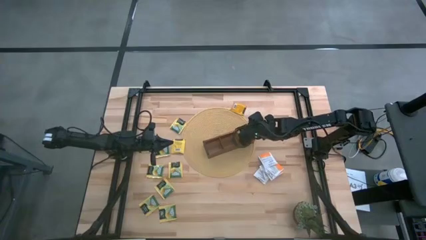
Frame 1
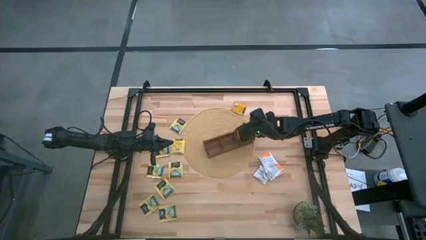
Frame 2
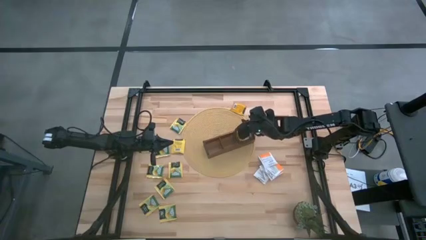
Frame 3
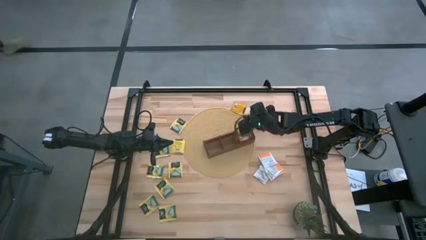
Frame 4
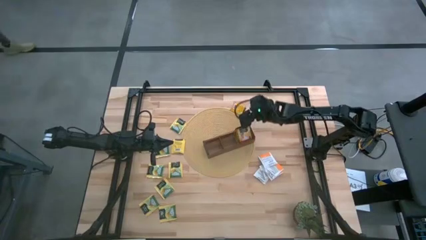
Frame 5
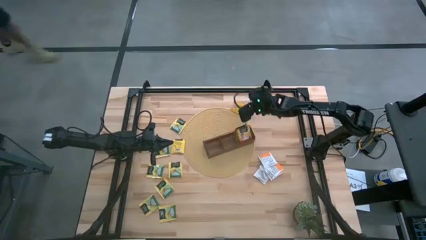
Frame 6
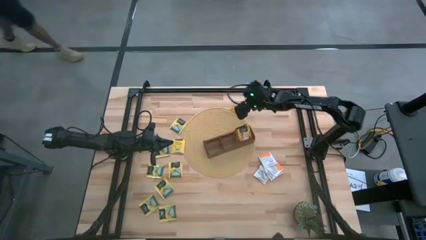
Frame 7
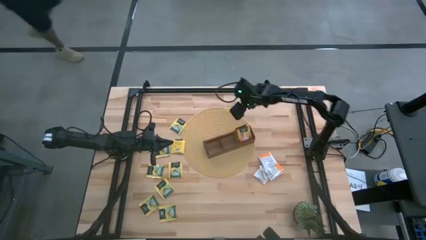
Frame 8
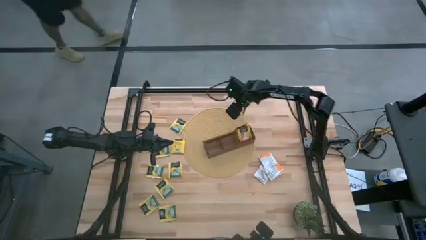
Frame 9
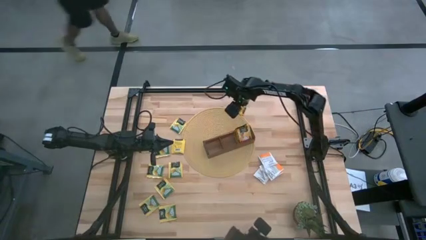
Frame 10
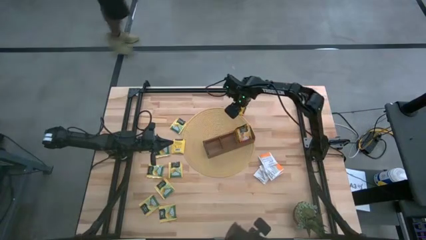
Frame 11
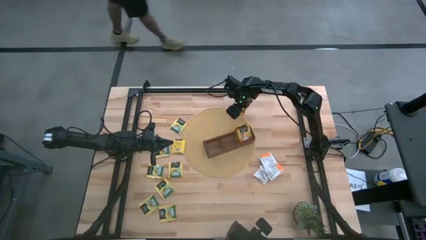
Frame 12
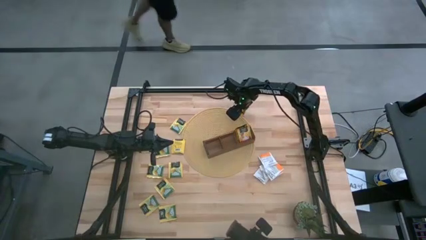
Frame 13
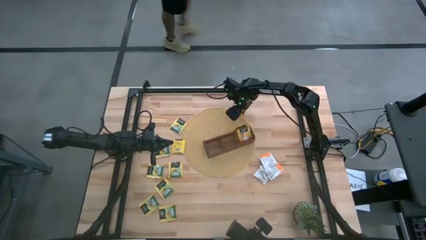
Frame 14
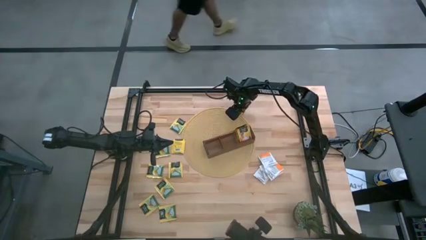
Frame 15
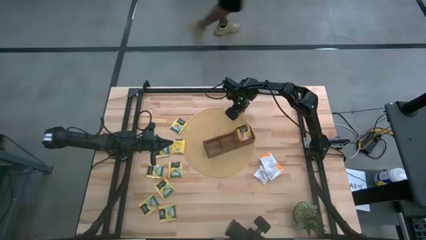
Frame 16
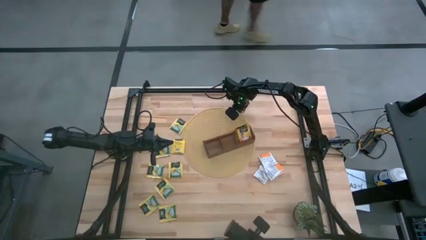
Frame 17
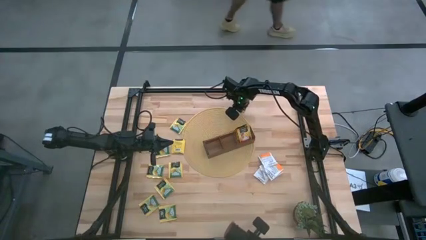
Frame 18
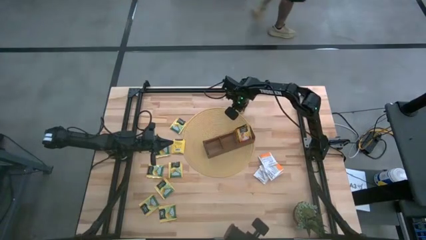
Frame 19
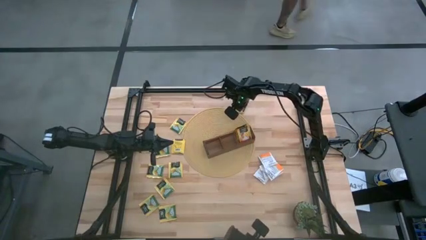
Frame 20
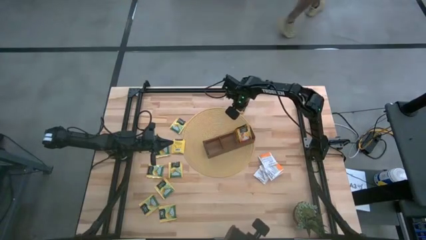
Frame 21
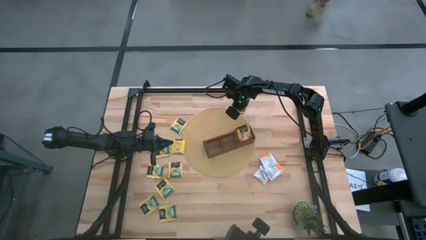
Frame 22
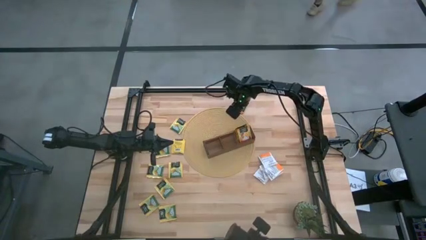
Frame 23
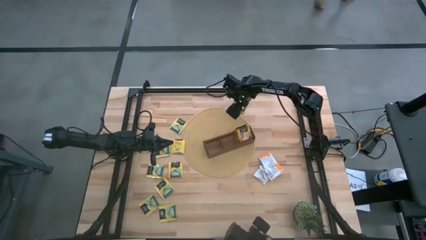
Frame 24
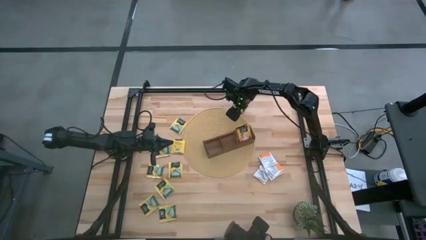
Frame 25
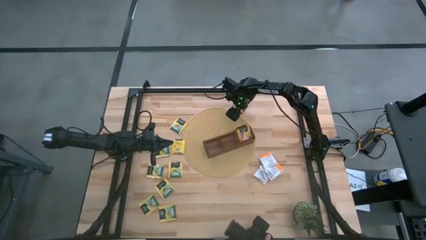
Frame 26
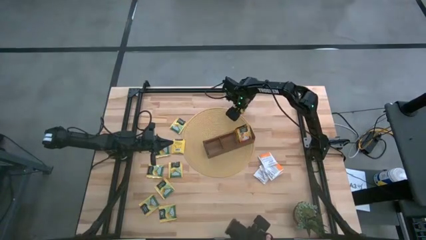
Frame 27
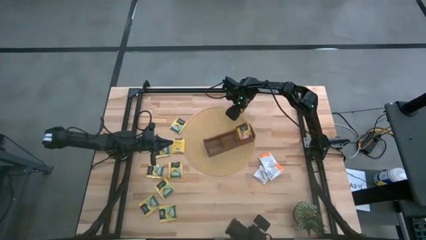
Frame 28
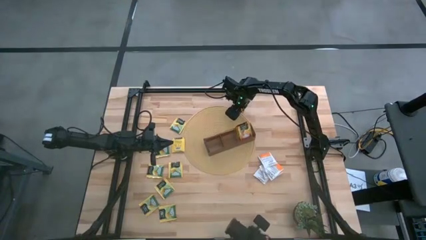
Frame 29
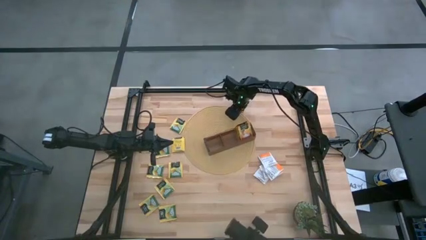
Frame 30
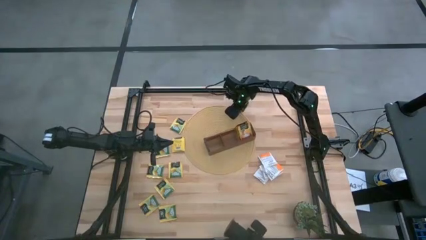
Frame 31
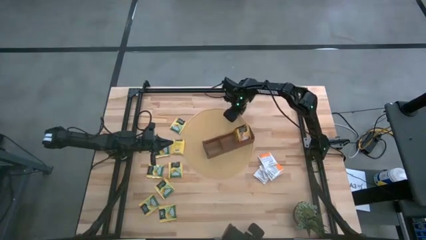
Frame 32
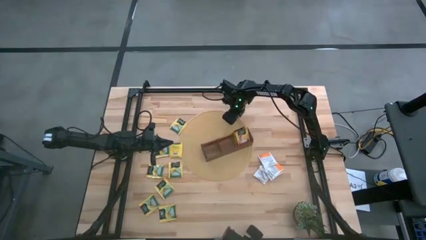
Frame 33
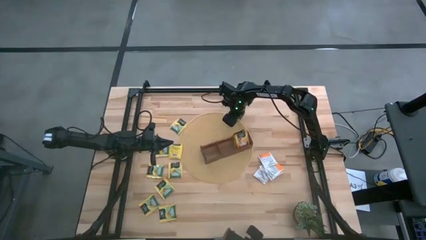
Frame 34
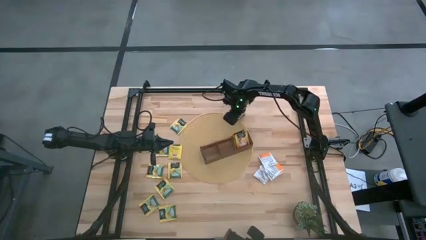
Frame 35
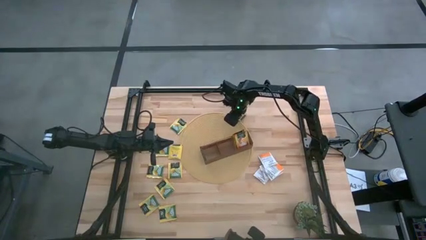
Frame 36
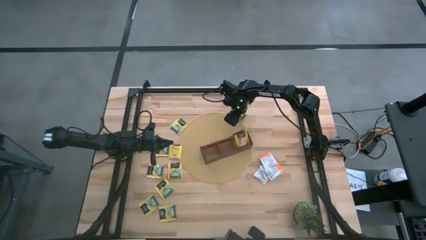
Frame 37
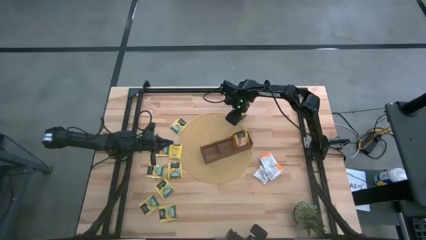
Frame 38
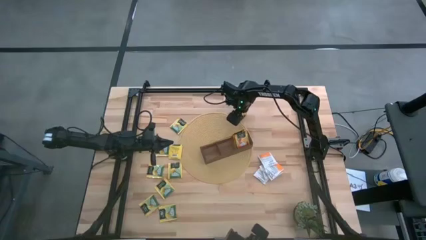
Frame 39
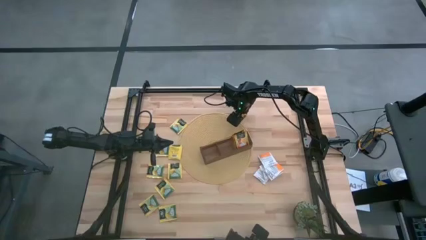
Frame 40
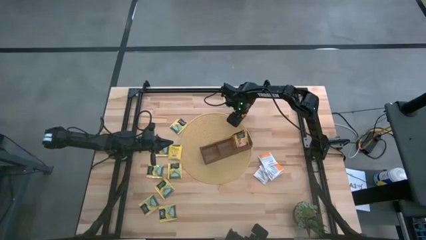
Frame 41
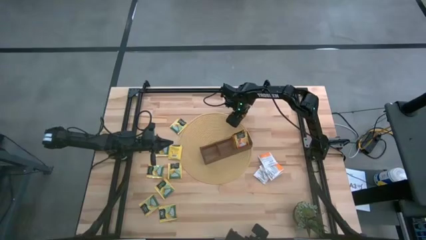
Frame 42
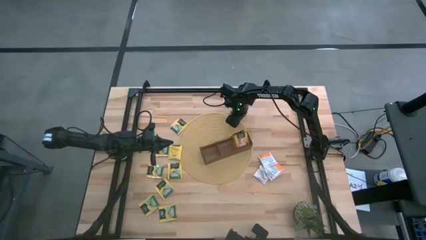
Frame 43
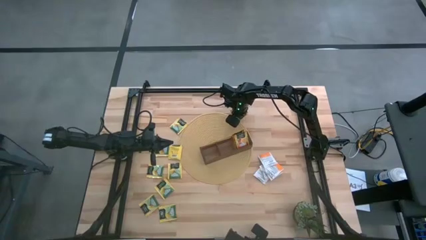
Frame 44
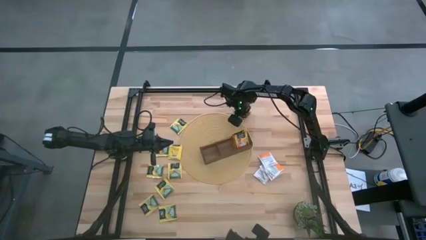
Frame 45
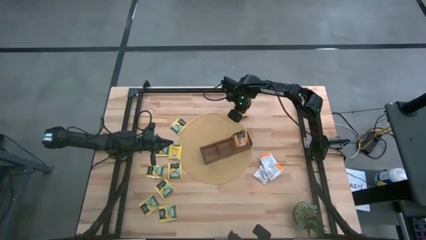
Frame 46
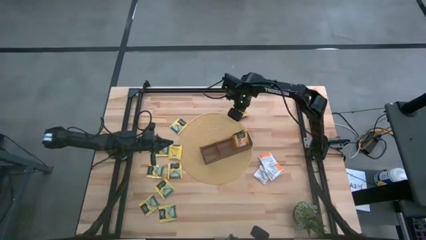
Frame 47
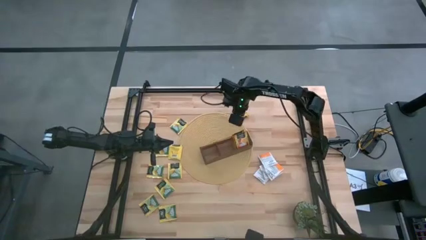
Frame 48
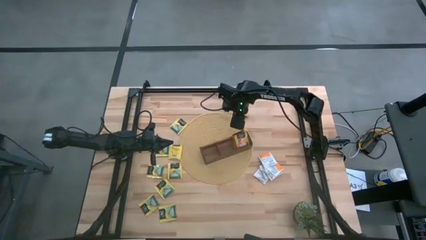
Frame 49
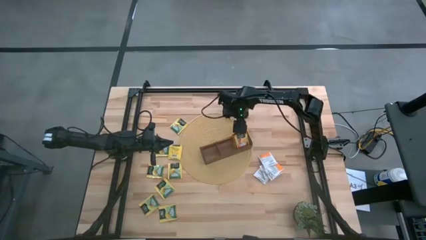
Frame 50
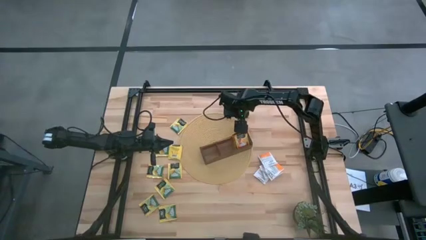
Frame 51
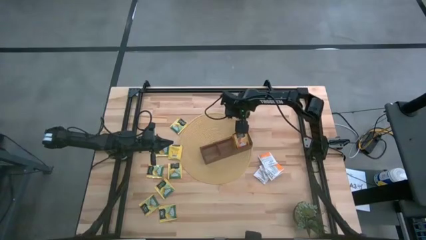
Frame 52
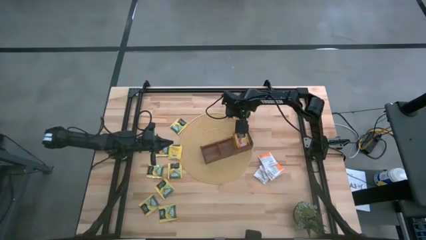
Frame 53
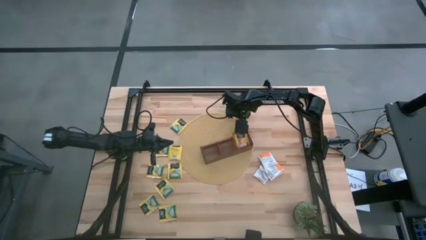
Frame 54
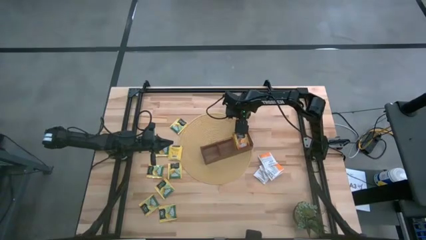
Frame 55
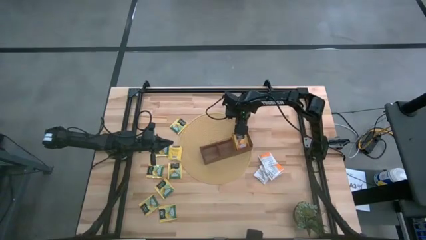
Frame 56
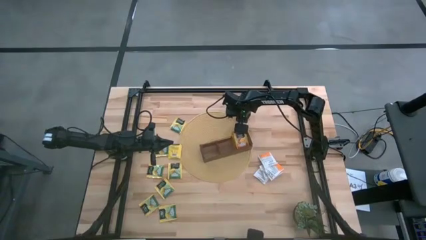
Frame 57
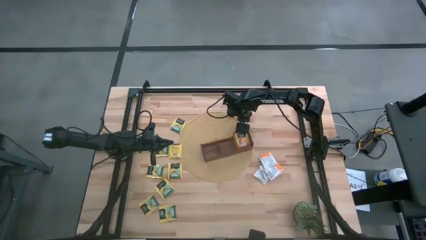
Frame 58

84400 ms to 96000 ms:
Task: Pick & Place Tea
Put the orange tea bag into the right section of the wooden organizer
